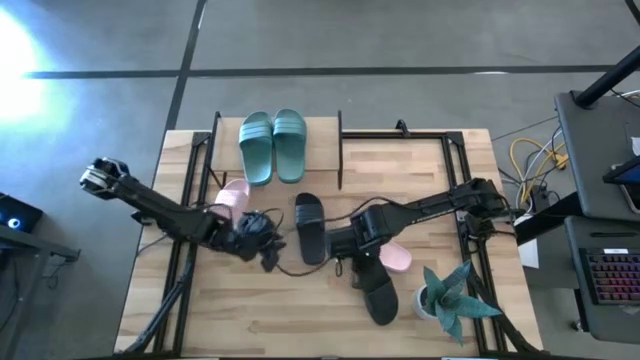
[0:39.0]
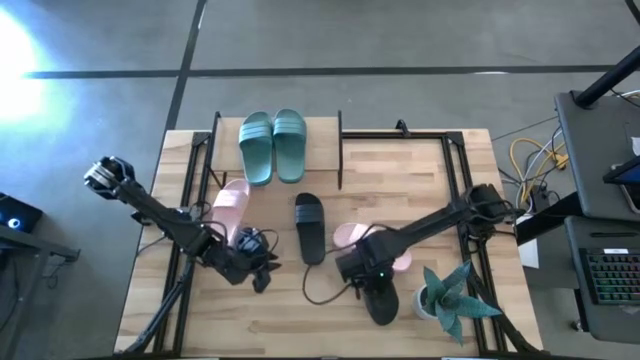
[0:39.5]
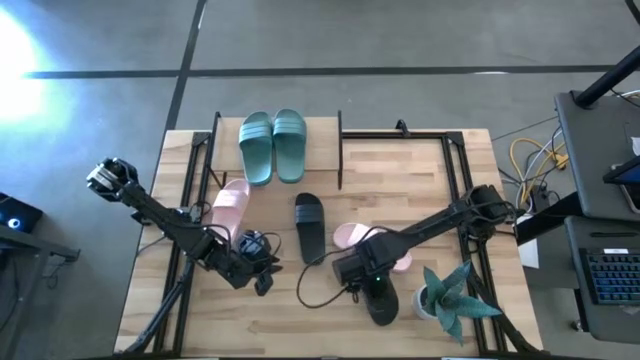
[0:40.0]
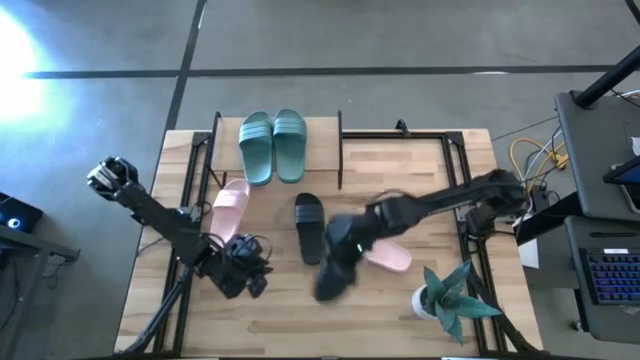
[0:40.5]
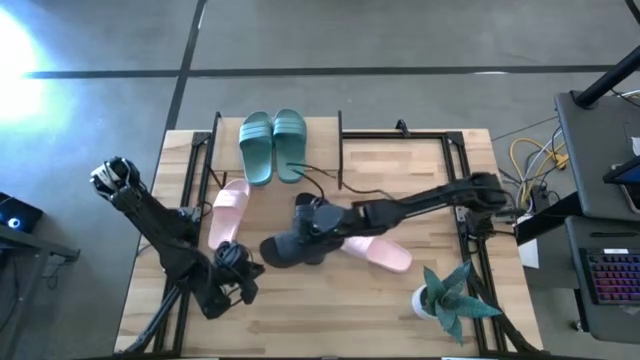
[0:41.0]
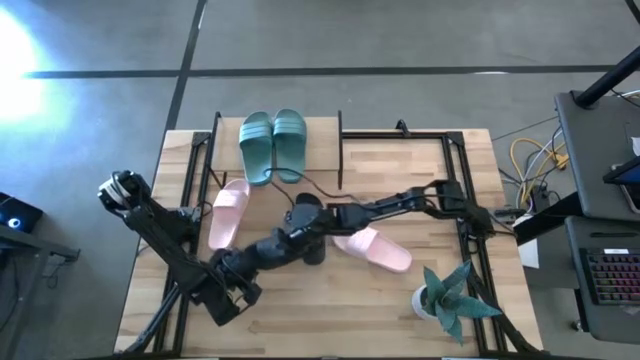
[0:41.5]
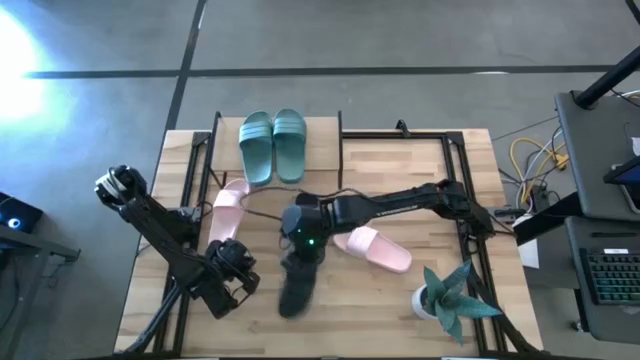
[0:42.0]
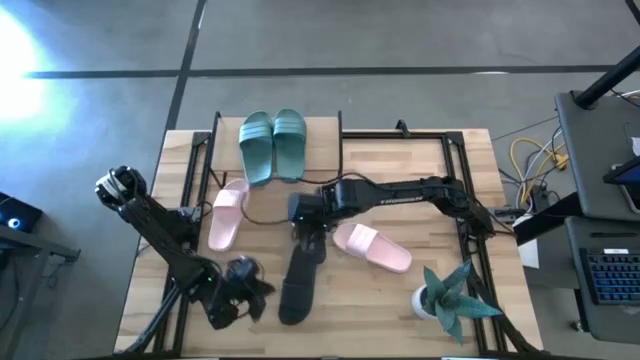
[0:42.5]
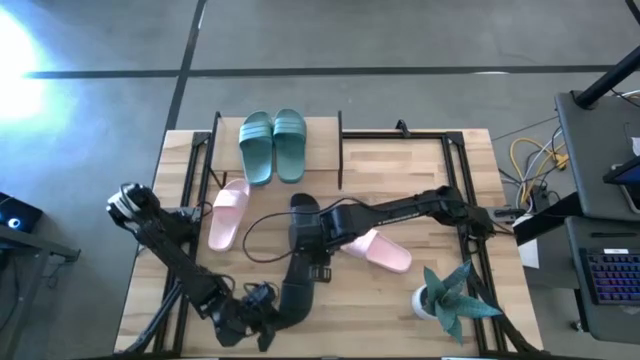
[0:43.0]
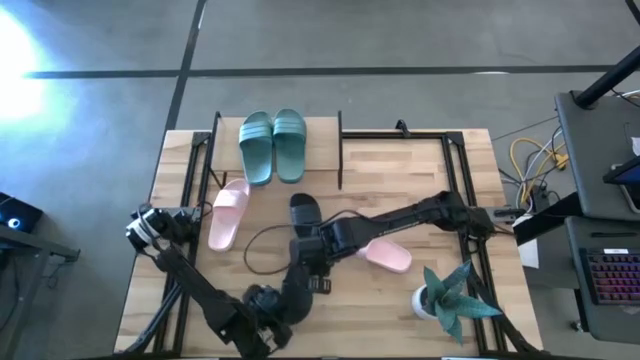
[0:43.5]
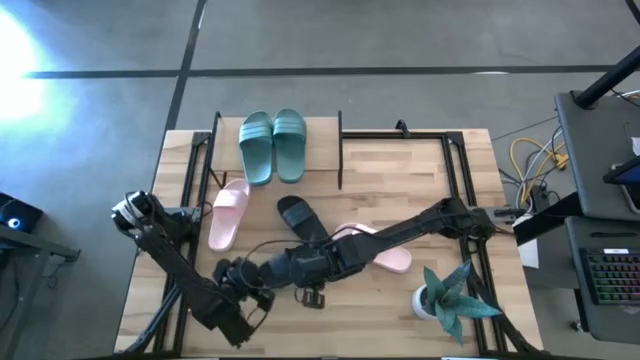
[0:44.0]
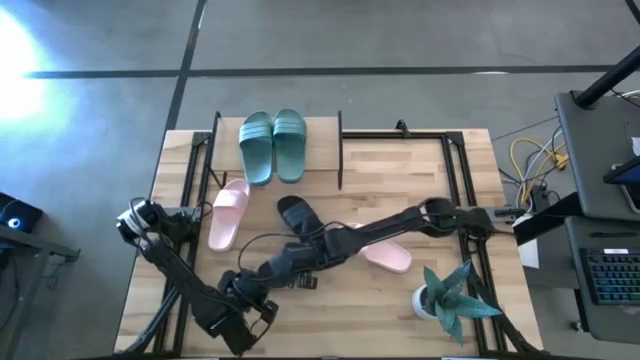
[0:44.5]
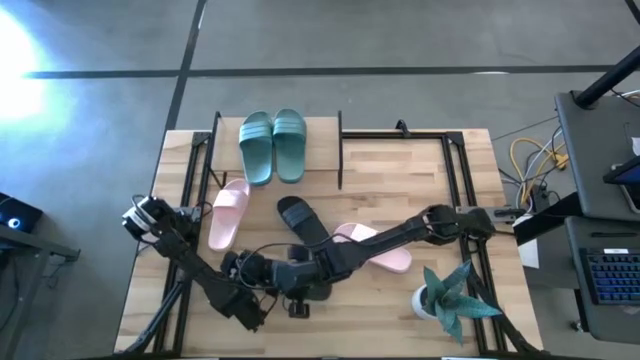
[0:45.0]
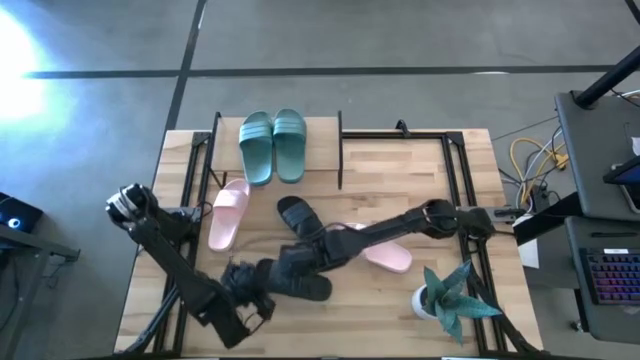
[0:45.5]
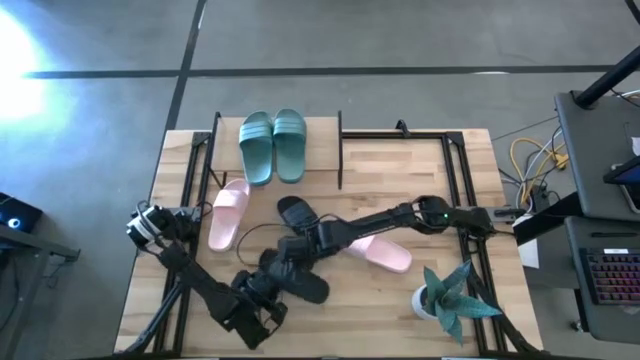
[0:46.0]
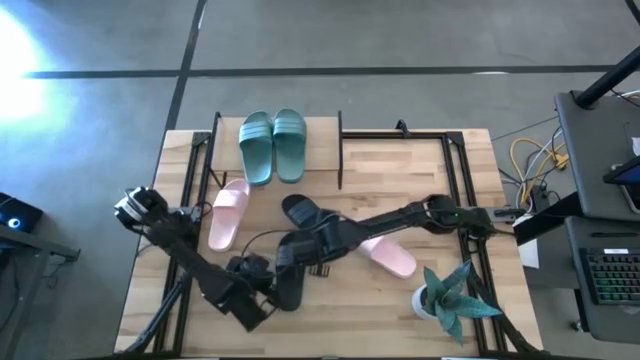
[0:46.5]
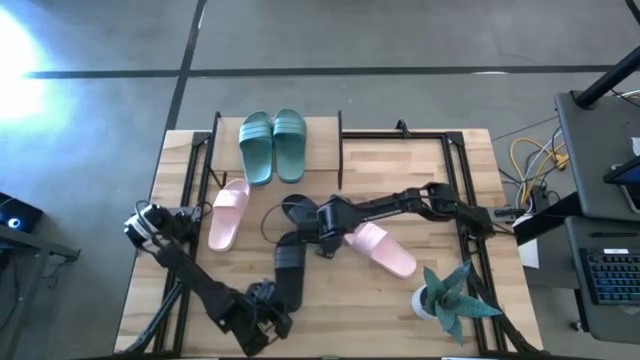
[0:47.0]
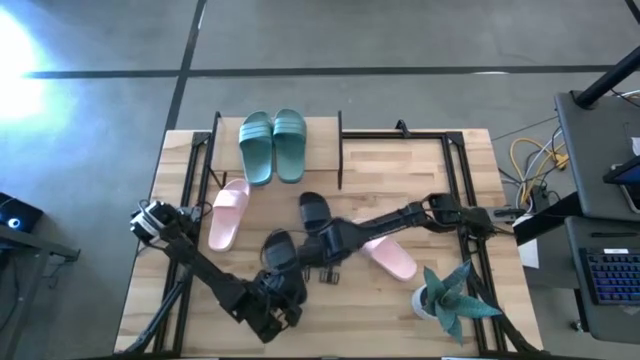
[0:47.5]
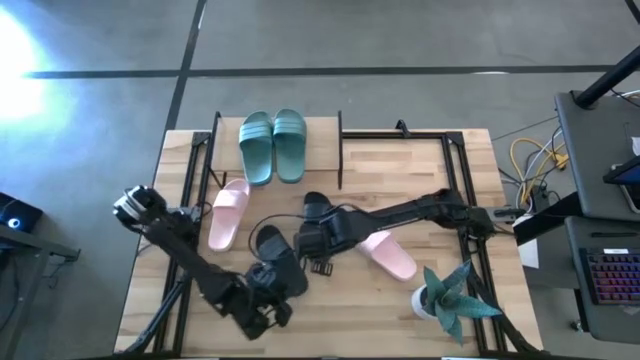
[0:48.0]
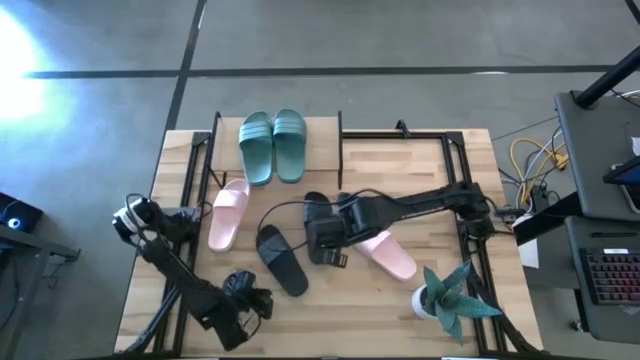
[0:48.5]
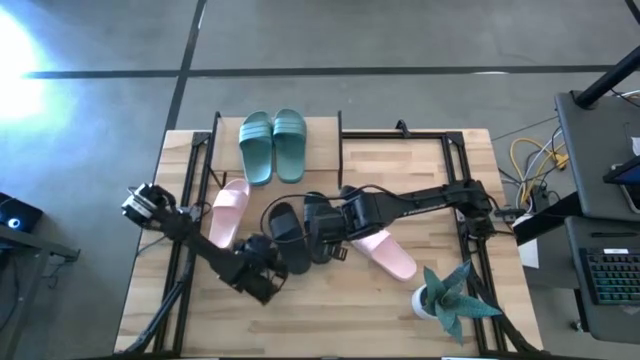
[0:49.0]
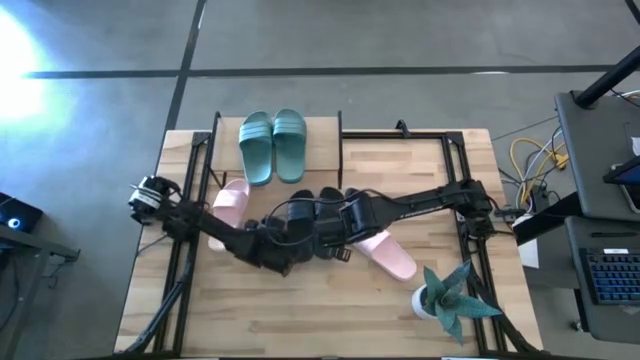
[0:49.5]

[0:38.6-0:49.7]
Task: Pick and place slides into the shelf
Put the black slide under the shelf

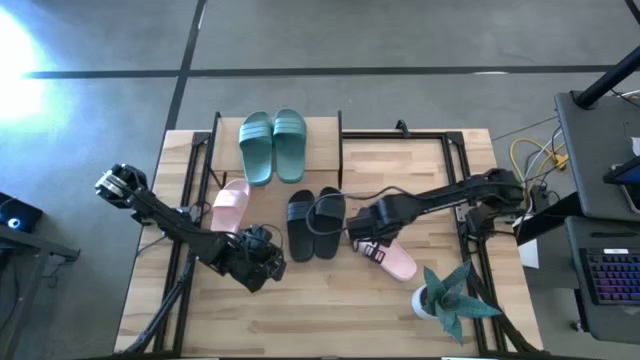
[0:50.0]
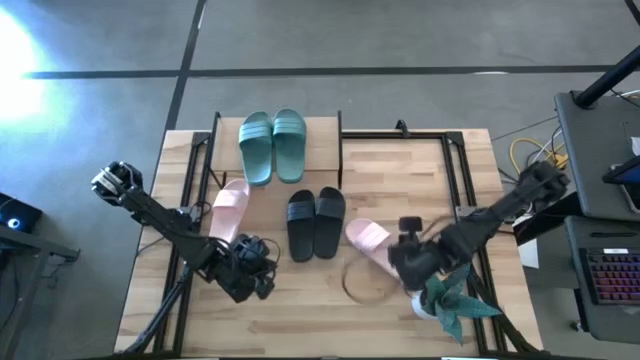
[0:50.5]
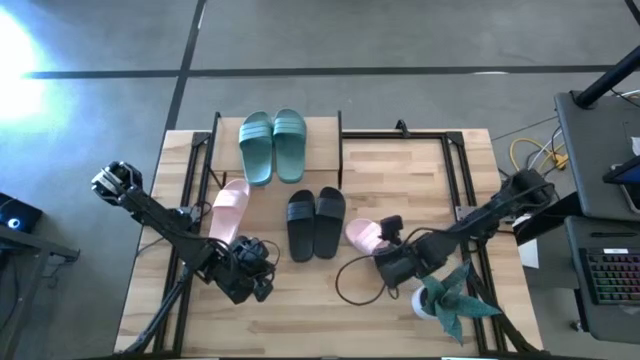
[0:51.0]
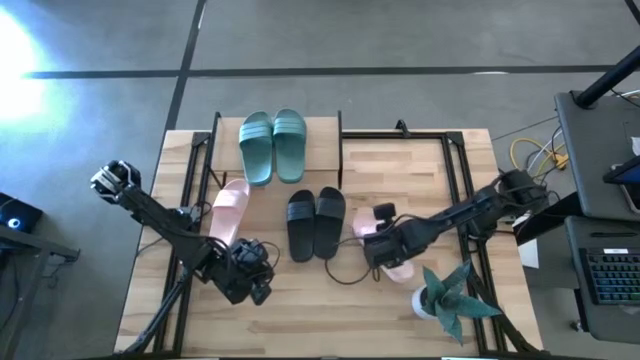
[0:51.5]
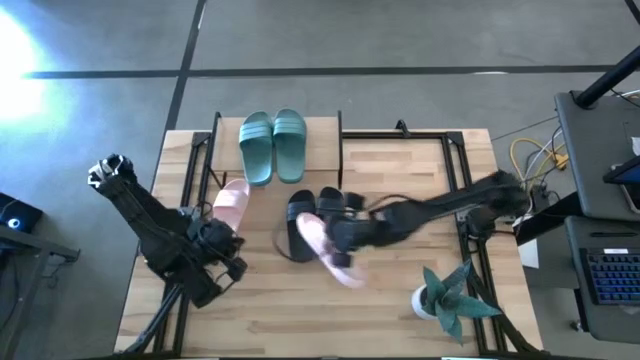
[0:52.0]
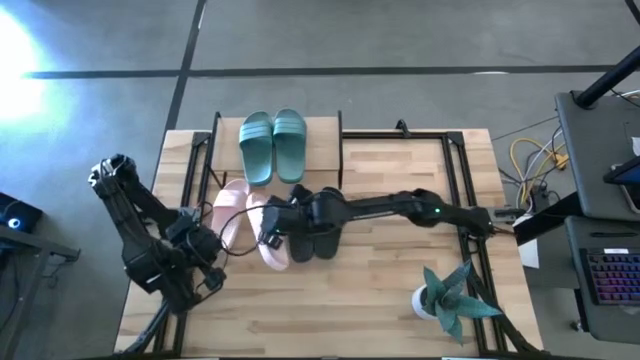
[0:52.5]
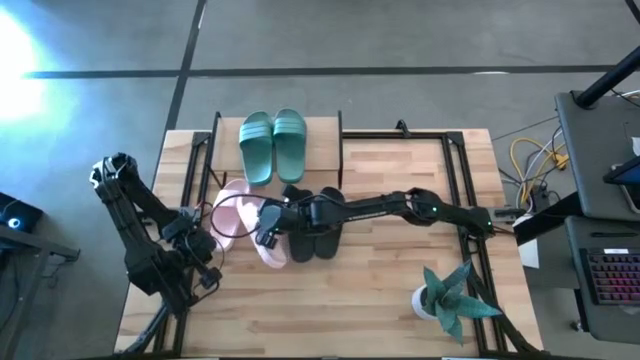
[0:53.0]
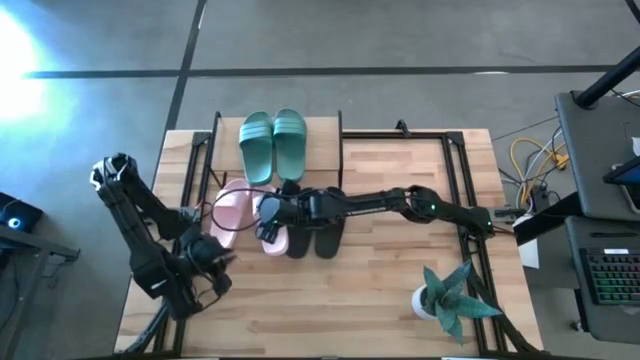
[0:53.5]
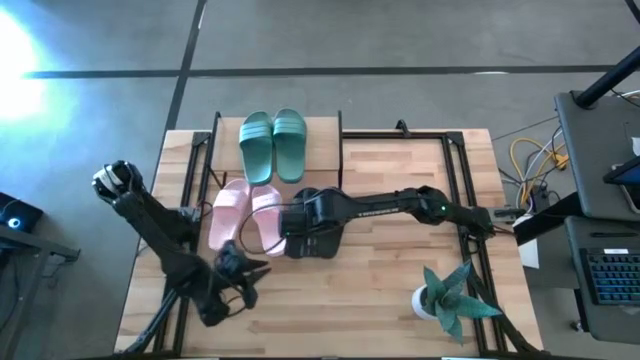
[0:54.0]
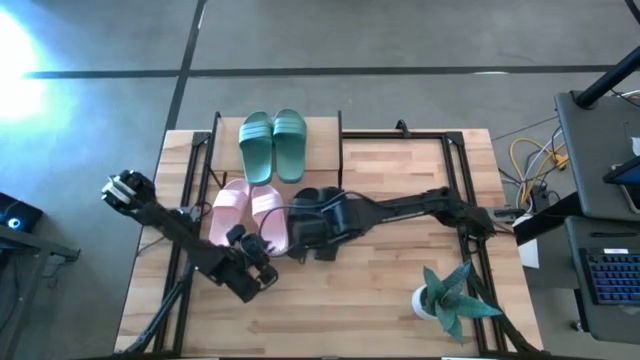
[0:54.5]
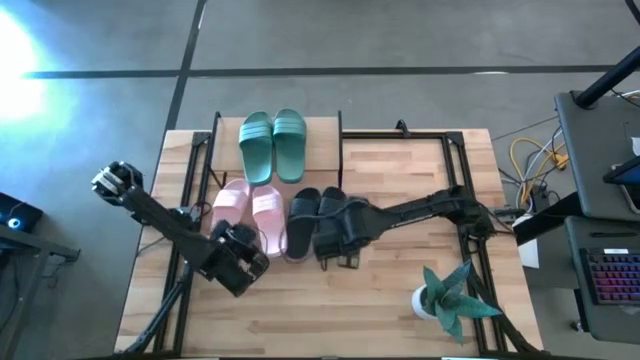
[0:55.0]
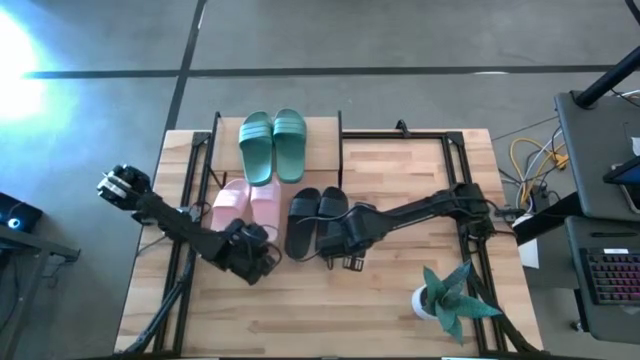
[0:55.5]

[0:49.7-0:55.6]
Put the pink slide under the shelf

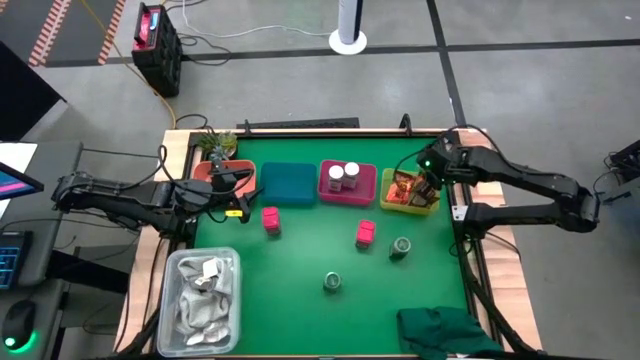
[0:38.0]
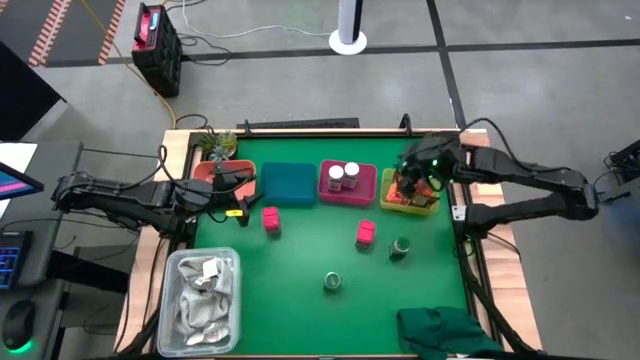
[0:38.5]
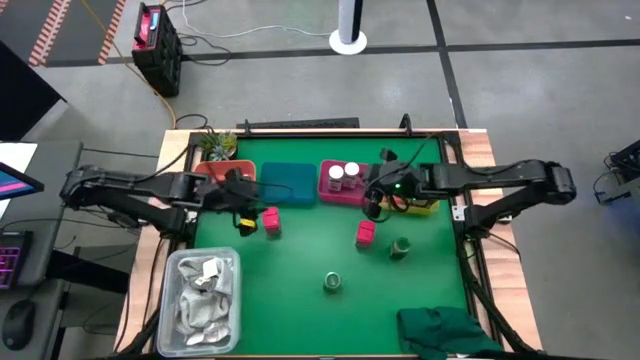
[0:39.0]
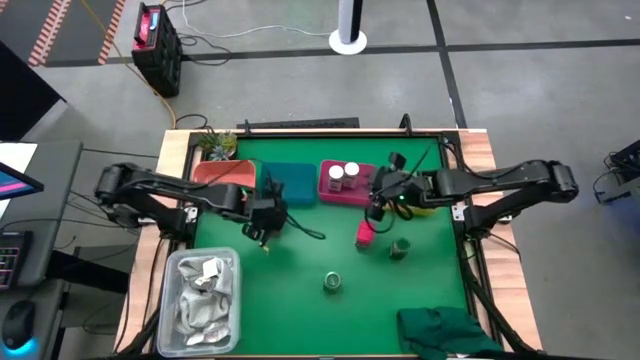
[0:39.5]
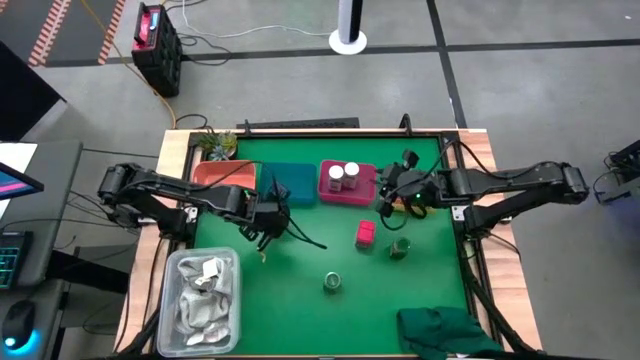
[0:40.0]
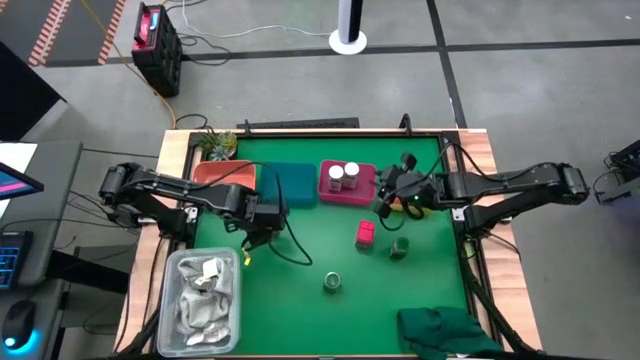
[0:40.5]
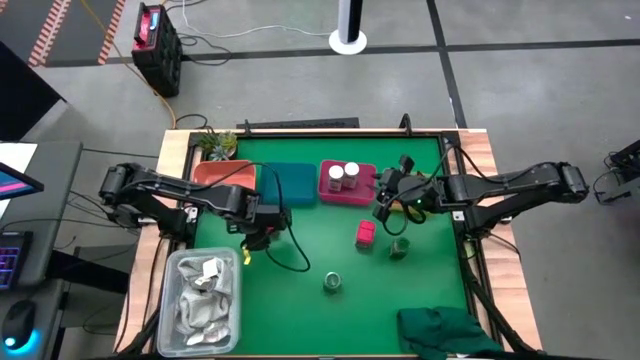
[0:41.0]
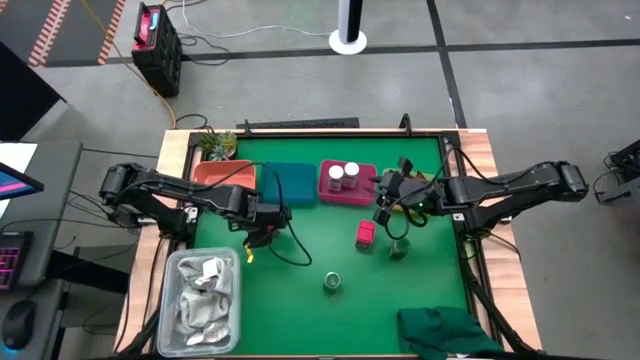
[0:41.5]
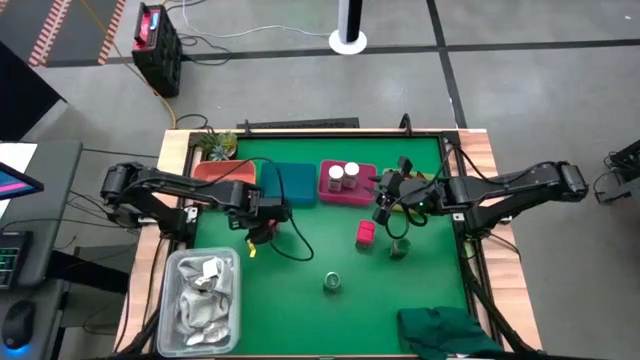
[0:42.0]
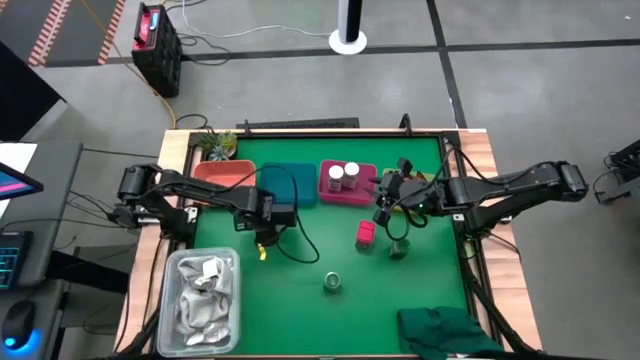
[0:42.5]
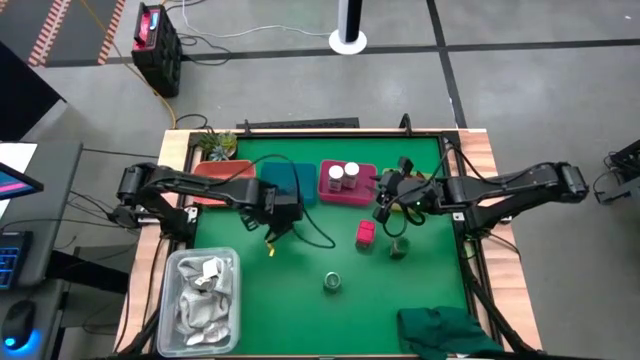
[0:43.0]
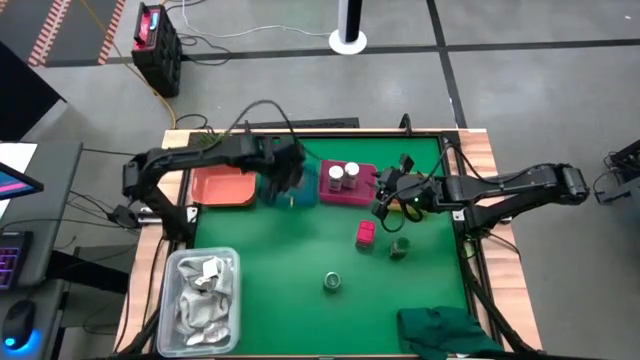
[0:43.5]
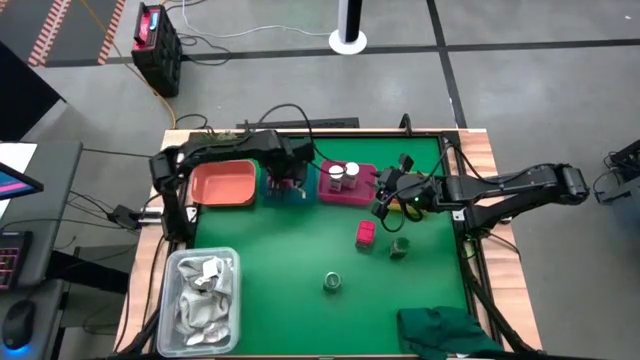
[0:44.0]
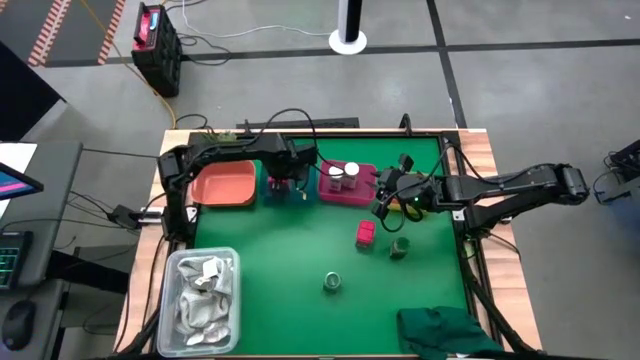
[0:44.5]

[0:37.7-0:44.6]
Task: Sort spices by type
Put the left red seasoning can into the blue bin
